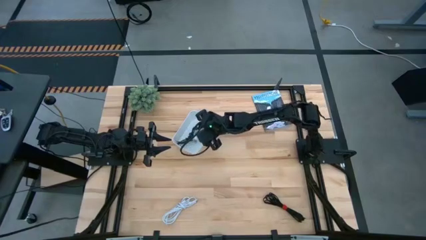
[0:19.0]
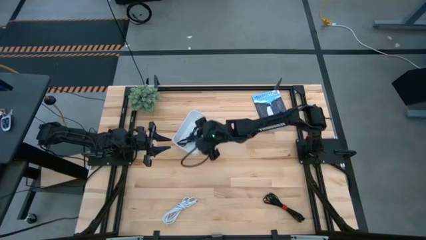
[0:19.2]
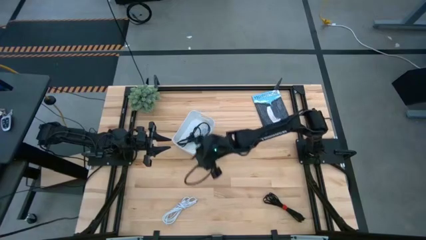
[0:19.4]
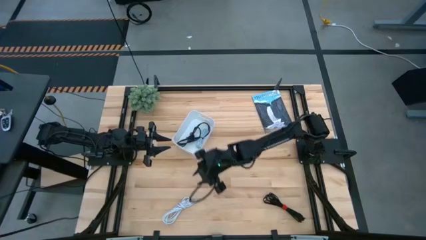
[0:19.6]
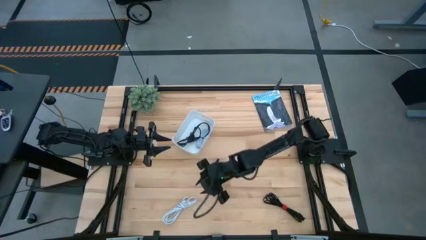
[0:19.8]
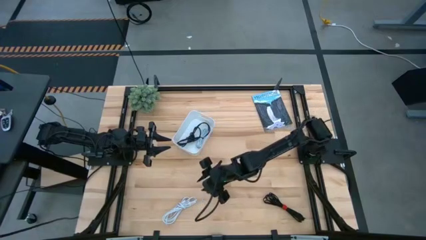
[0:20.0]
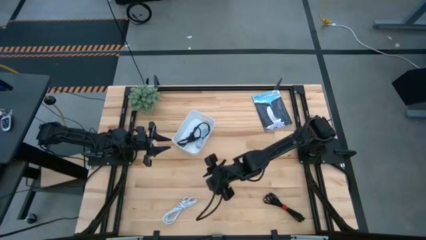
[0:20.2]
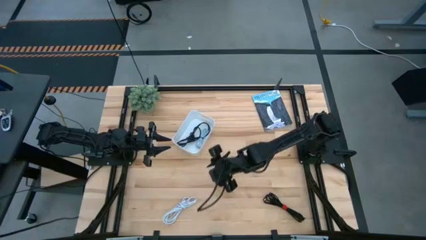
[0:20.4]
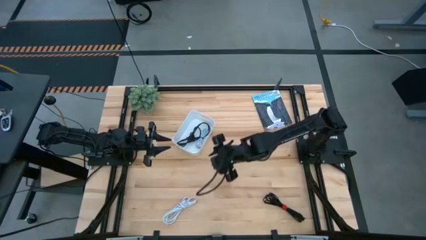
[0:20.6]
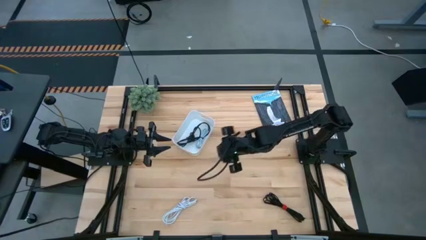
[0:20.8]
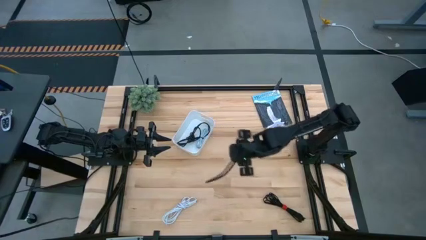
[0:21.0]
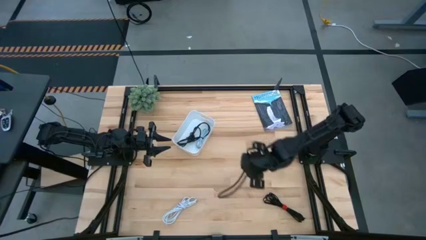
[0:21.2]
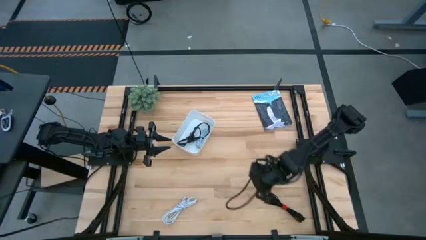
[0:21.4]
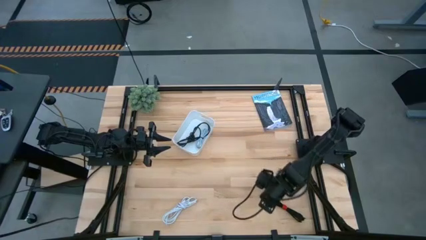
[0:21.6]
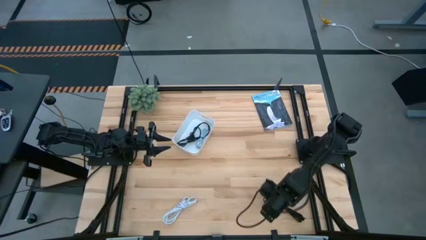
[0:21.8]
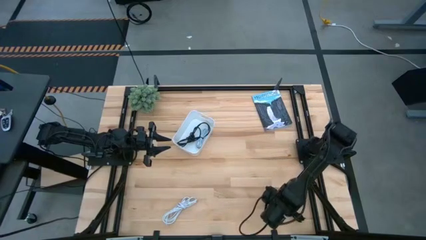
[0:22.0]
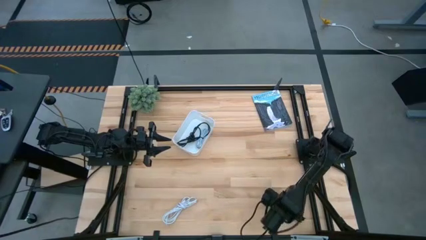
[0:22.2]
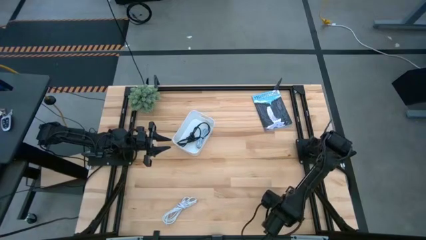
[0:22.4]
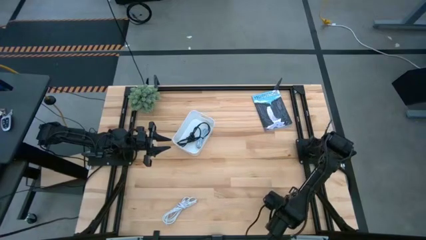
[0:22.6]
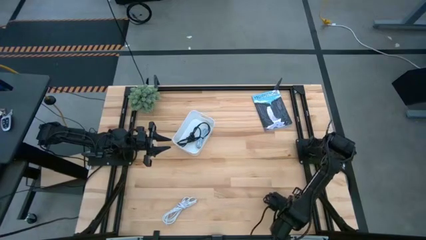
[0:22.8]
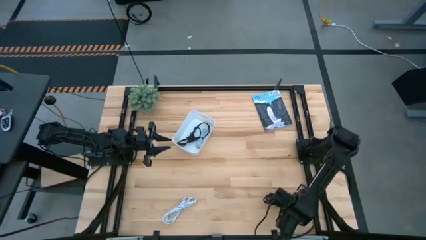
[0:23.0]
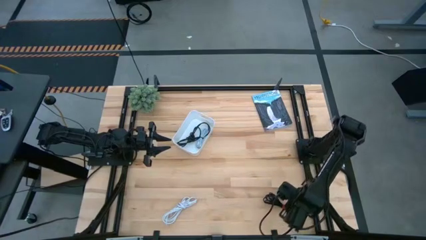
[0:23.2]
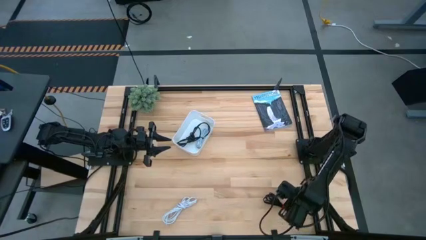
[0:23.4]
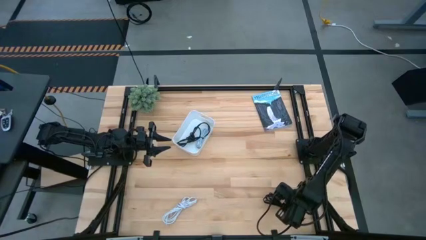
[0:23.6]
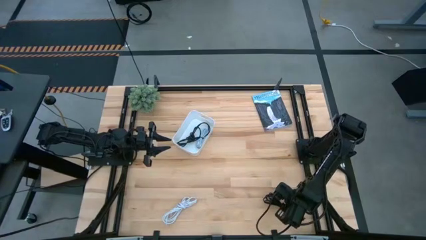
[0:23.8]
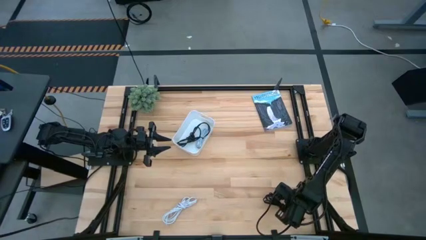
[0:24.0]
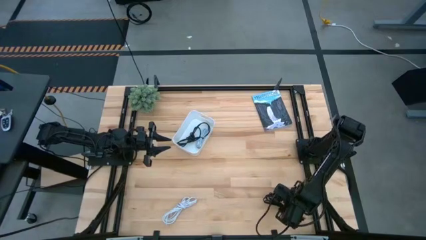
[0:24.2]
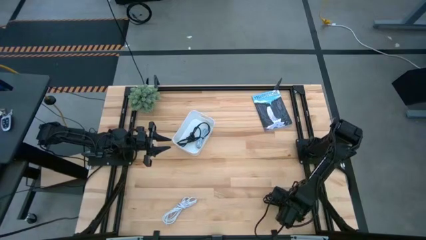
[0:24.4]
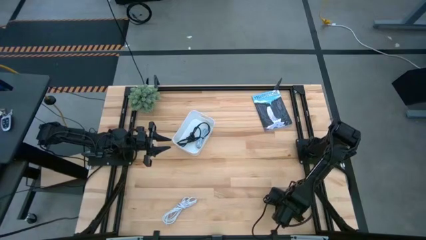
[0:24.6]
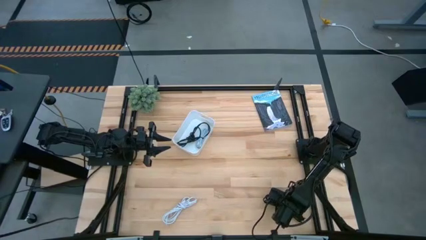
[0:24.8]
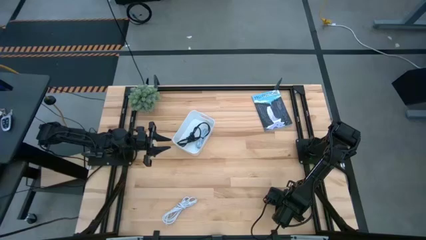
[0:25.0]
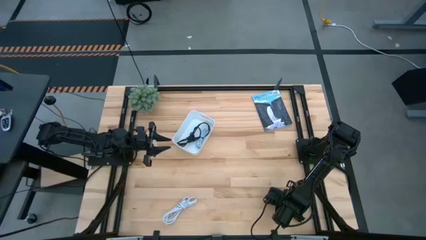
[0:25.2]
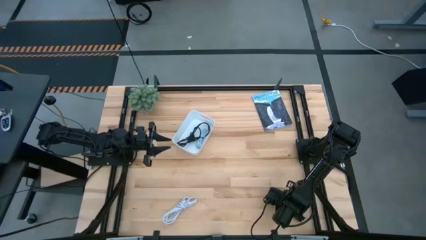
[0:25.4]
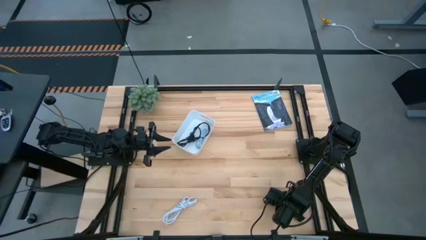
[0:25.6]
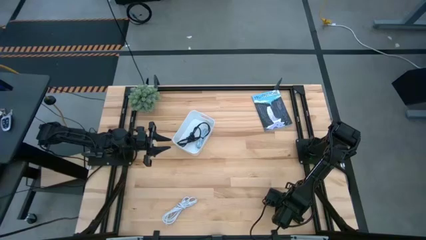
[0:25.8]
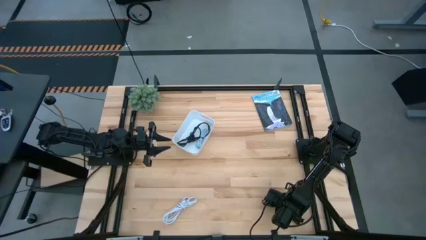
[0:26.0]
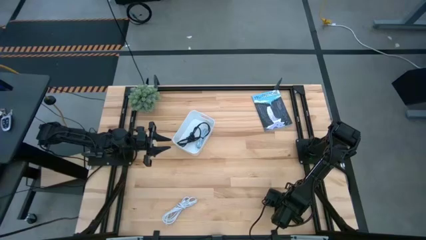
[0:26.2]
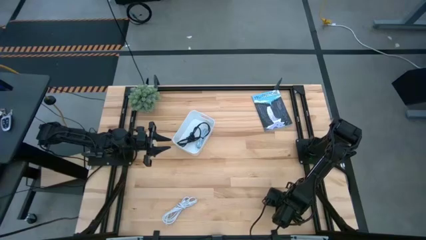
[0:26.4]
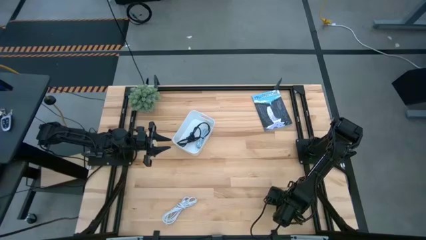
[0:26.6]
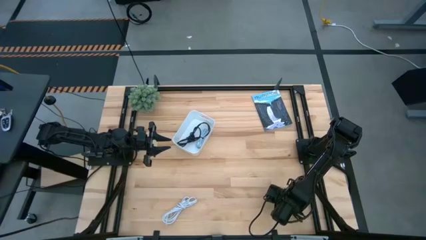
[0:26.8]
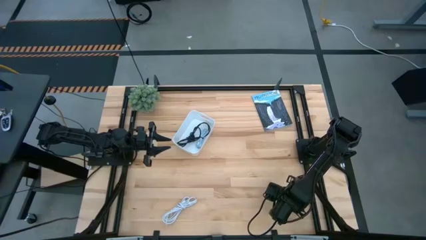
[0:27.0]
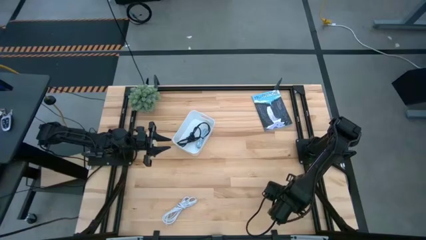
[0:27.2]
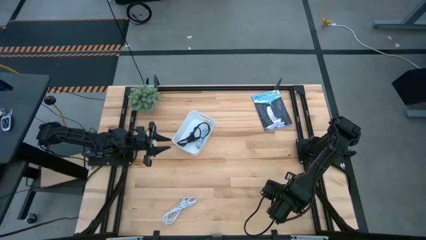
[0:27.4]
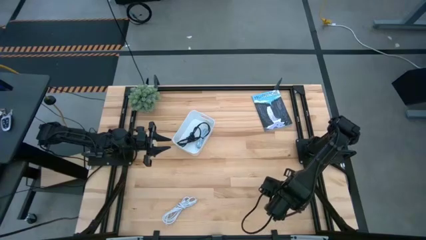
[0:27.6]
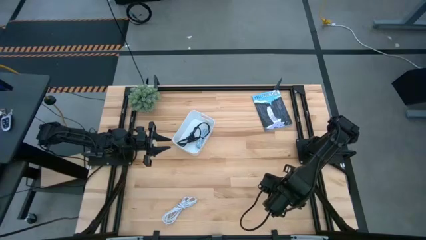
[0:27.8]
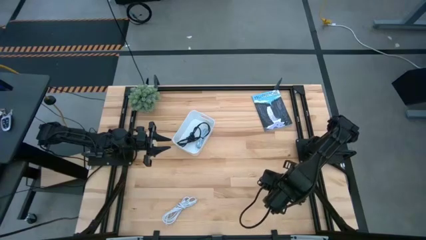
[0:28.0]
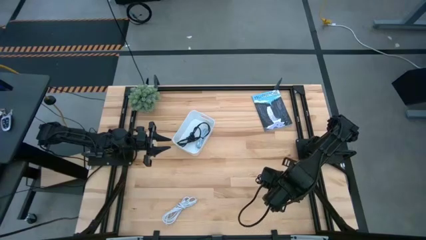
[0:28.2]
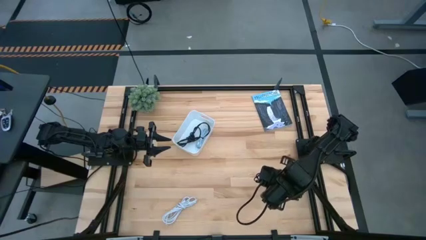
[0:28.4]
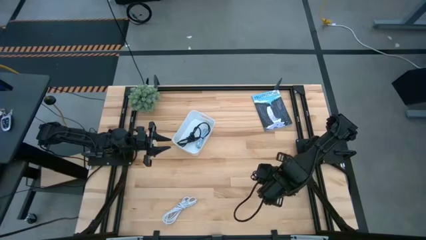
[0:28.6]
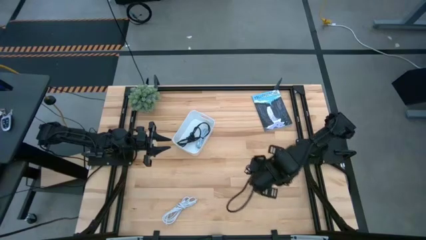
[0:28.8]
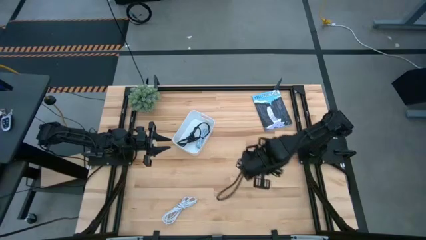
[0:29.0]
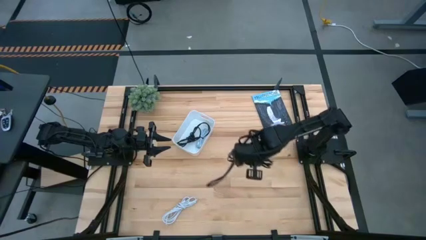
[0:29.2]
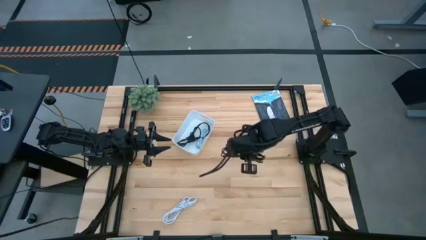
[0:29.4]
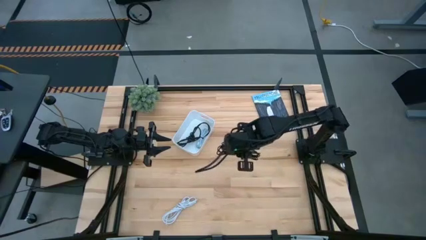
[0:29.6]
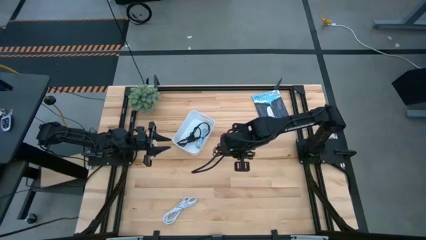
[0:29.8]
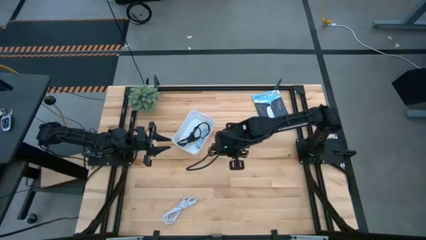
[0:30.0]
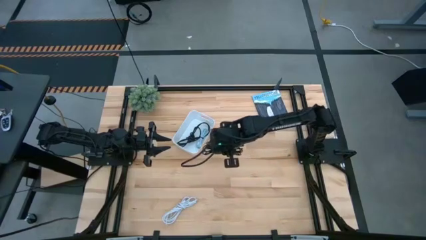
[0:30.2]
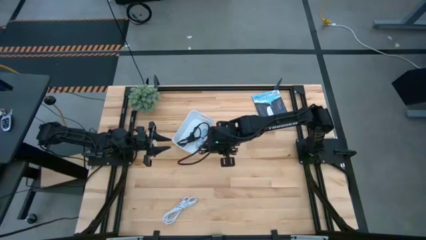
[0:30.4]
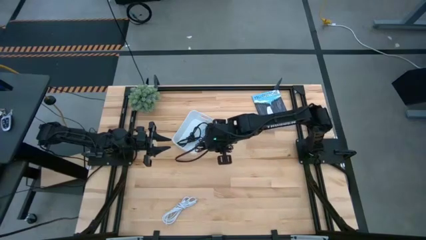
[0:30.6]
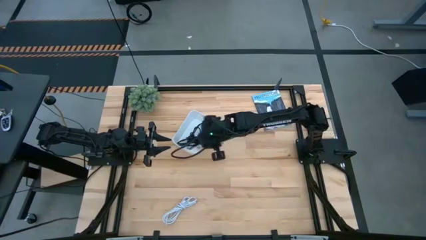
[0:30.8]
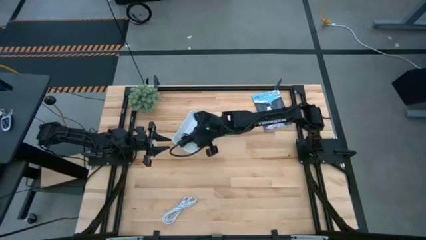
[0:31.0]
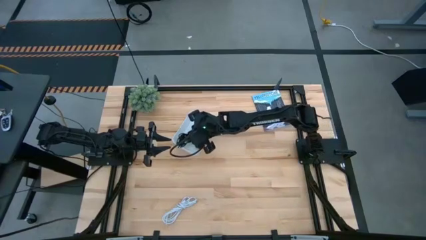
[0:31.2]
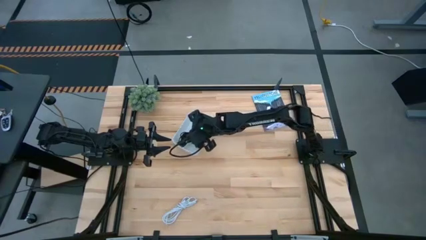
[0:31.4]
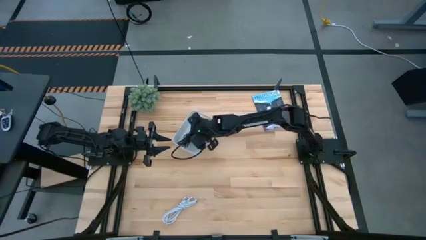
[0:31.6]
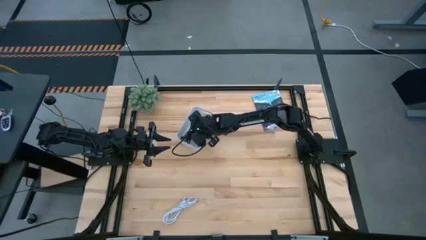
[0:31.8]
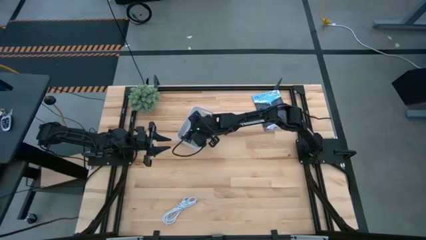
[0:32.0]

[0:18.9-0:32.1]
Task: Pick and place USB-C Cables
Put the black charger cable into the white bin

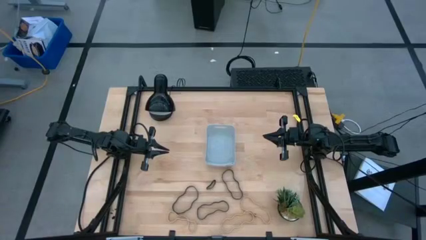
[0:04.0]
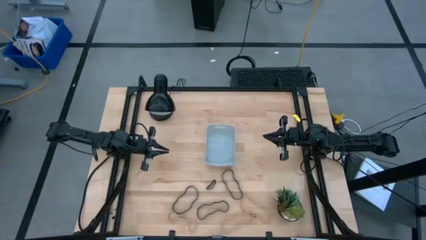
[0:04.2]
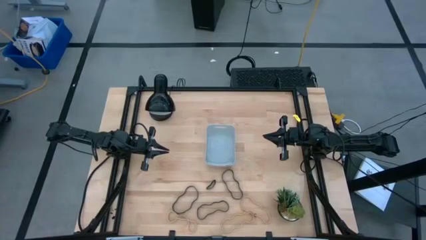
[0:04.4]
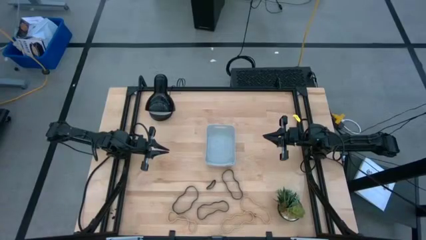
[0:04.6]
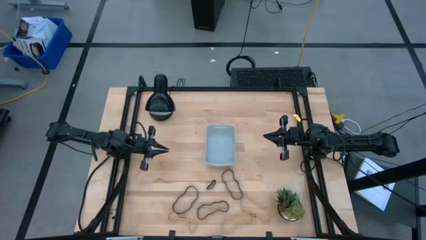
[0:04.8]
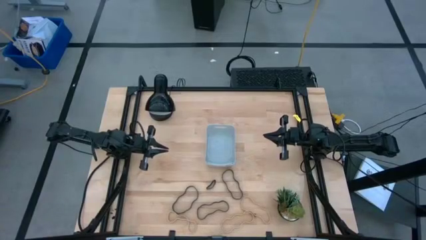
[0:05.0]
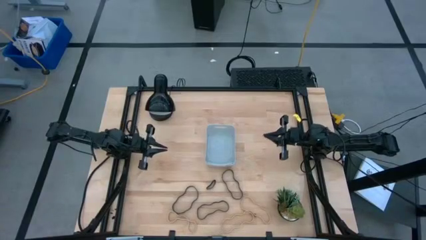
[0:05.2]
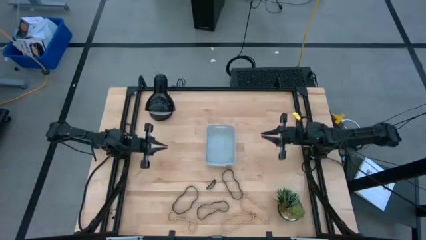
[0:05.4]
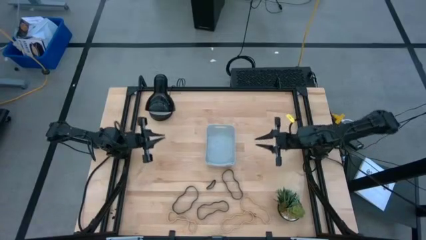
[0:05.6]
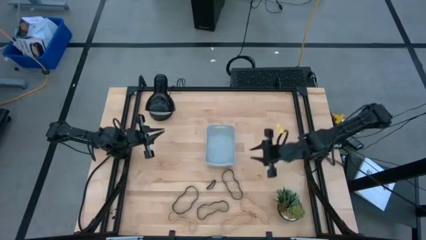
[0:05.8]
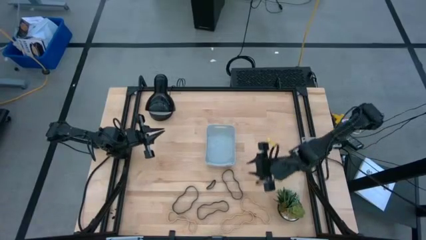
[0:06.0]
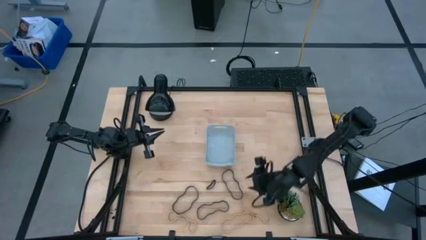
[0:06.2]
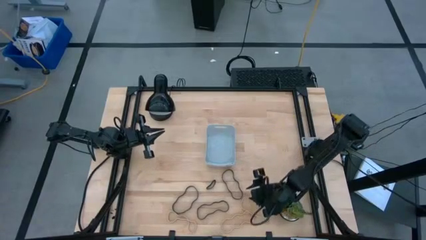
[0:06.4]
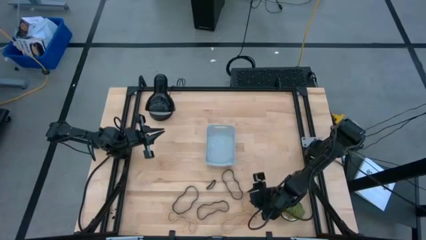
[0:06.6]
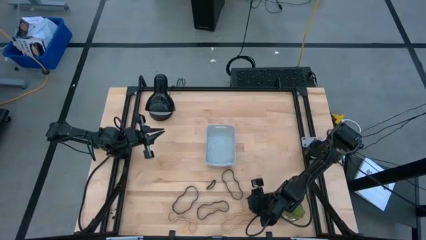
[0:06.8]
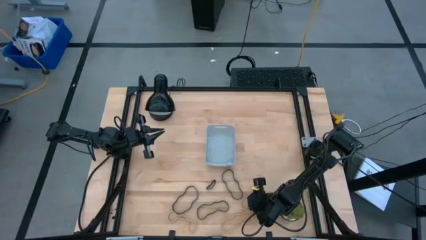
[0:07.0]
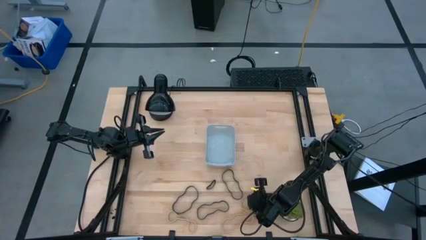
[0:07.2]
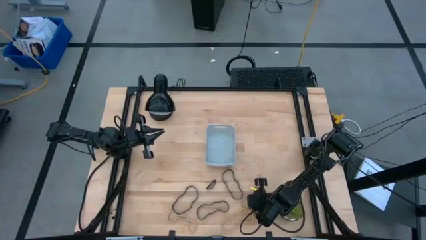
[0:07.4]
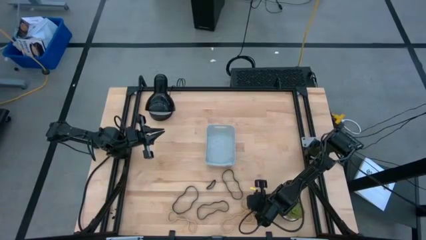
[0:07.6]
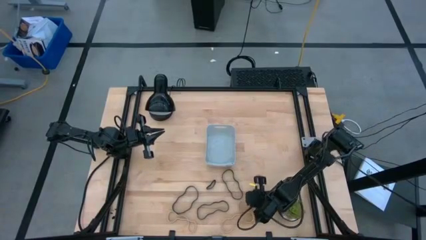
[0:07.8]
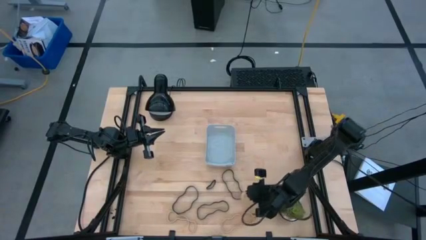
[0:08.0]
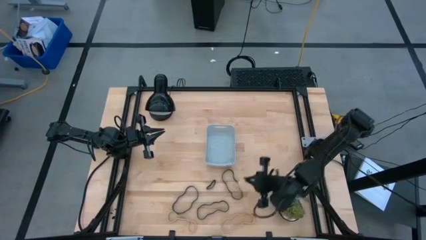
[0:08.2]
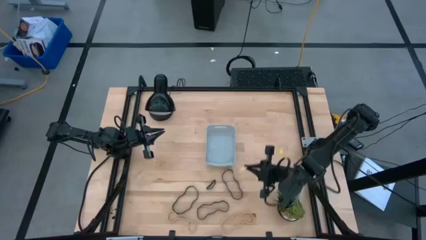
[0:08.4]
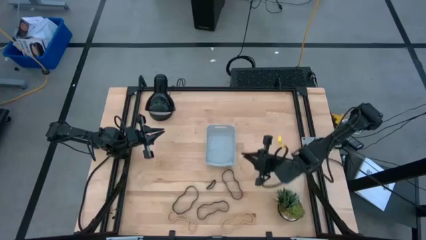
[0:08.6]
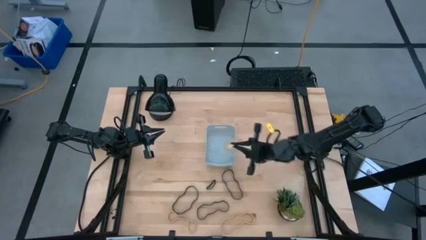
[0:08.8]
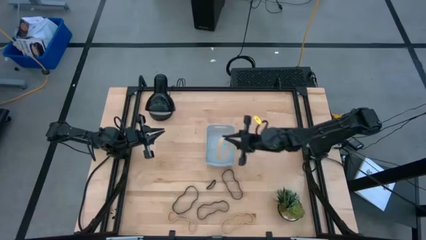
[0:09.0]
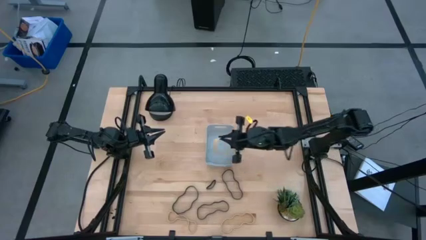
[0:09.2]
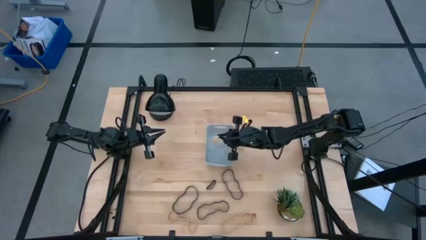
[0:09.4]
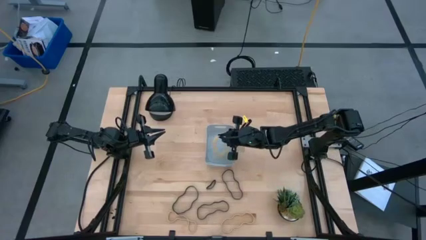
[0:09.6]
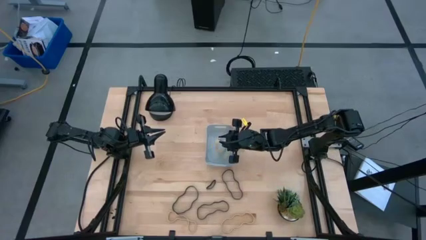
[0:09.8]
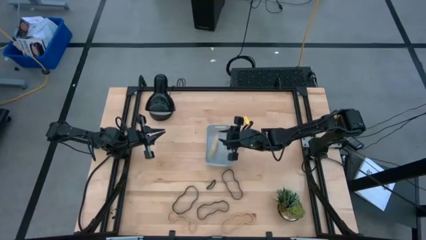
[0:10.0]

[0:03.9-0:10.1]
Task: Pick and place rubber bands into bin
Put the right brown rubber band into the gray bin
